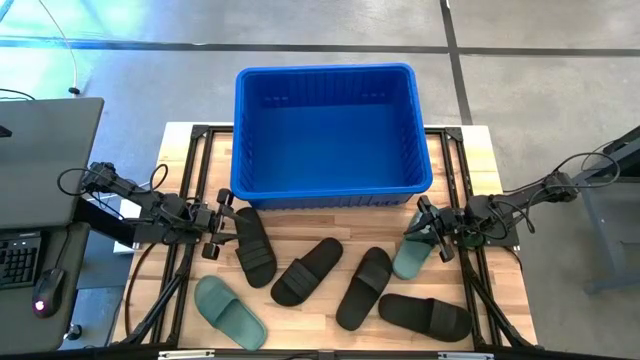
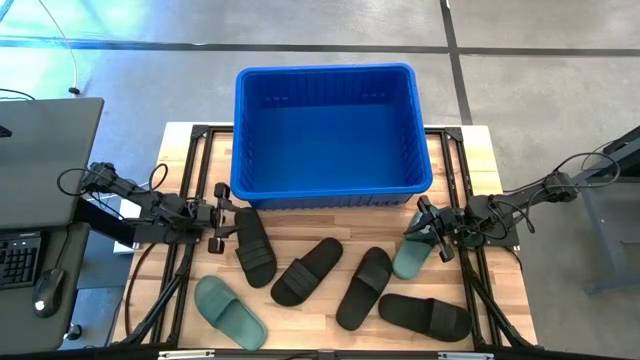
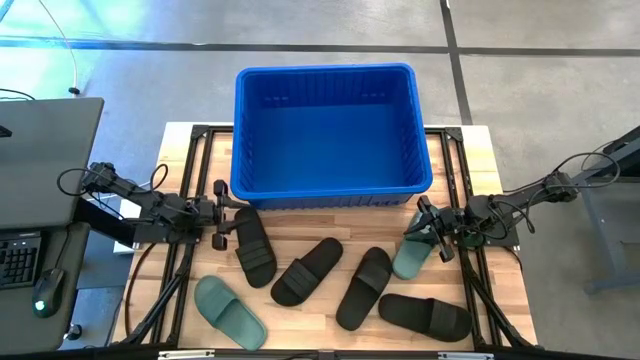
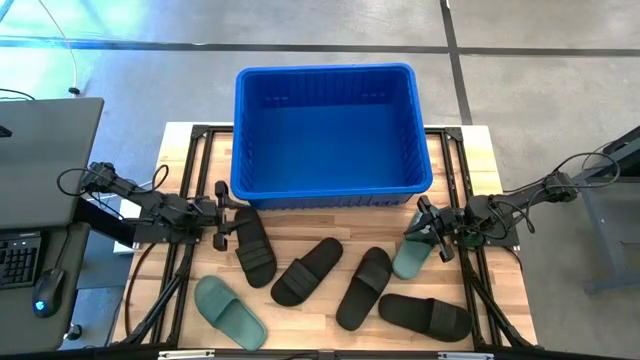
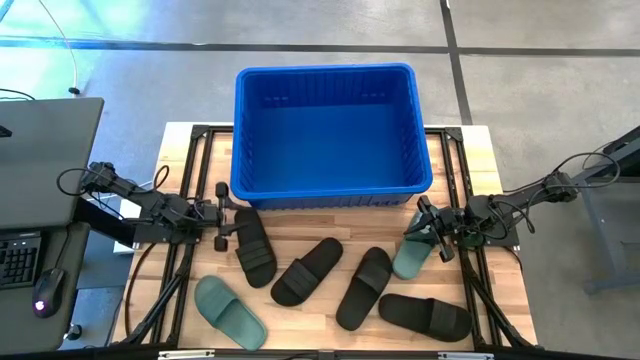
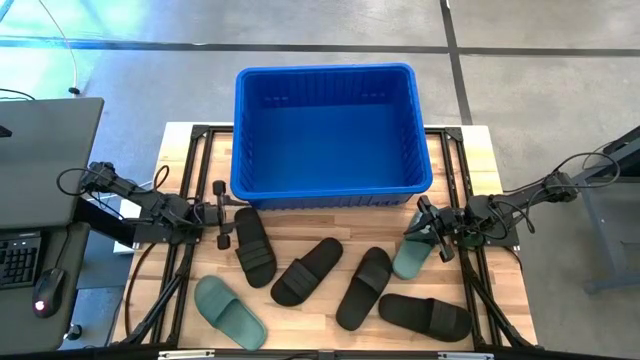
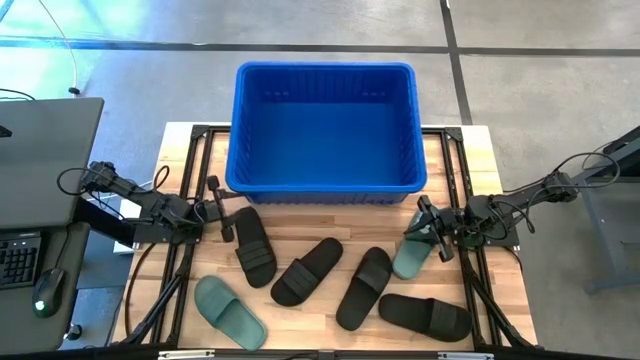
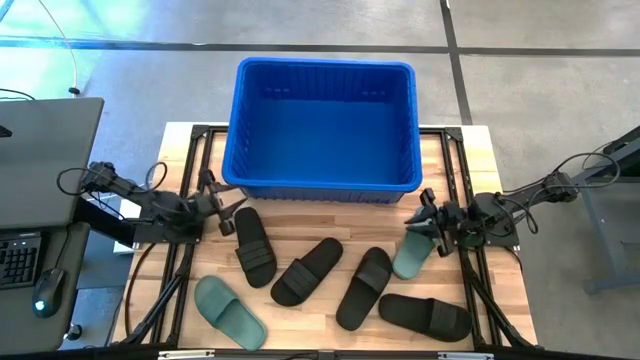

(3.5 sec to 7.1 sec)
Task: Pick and place slides into bin
Adjust the blue container

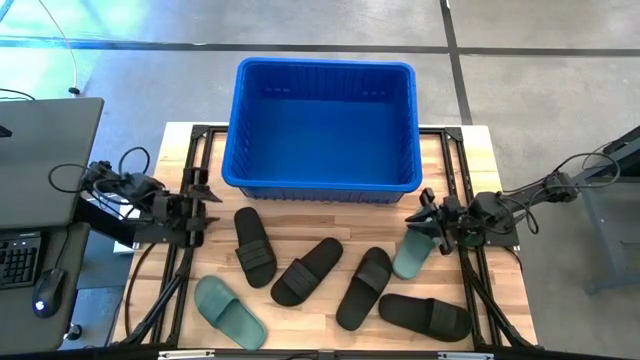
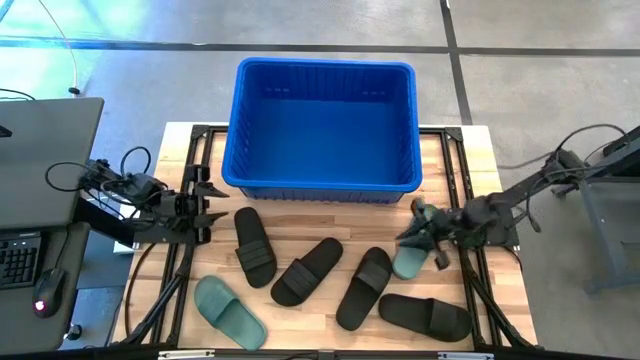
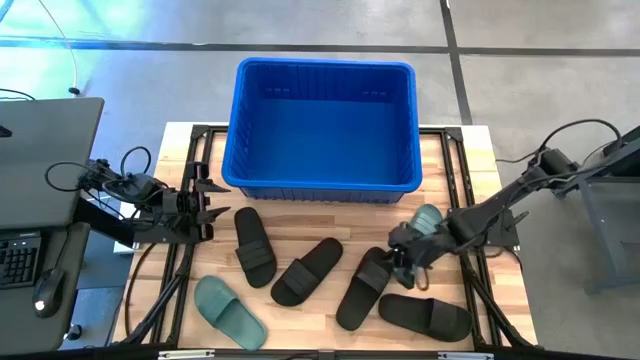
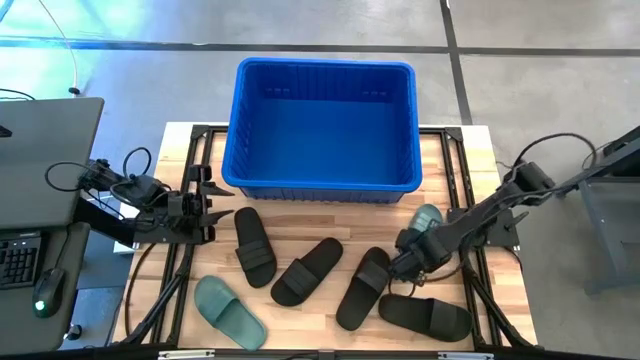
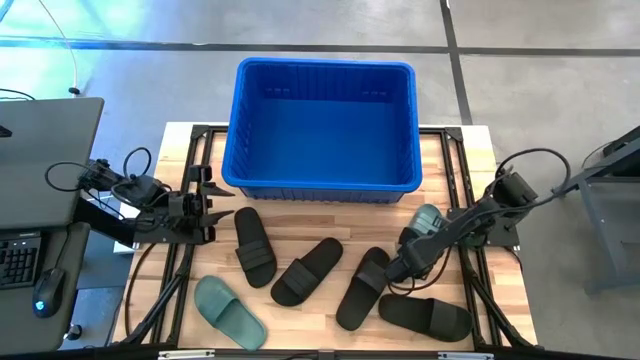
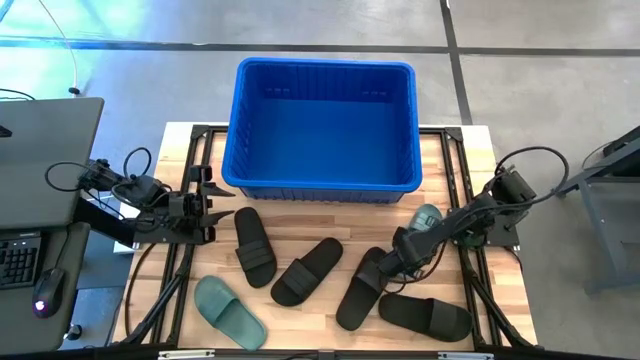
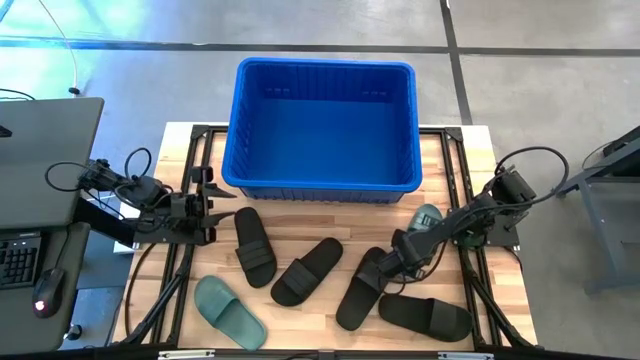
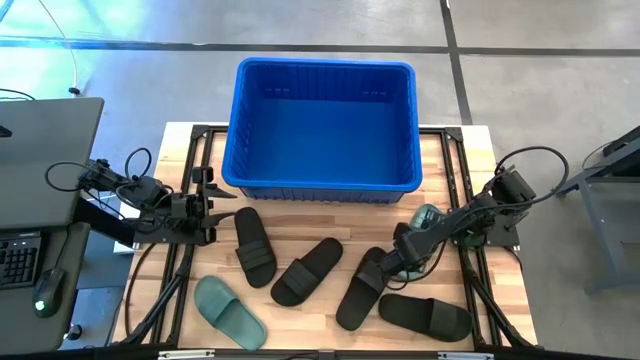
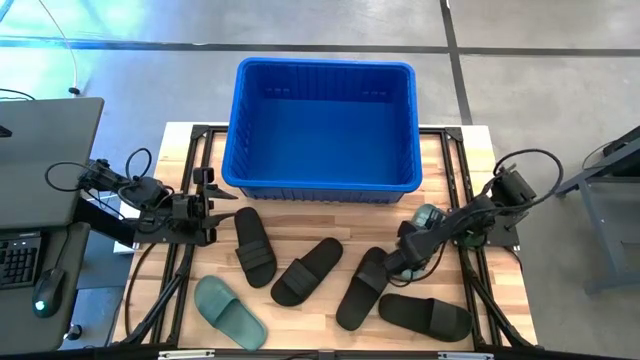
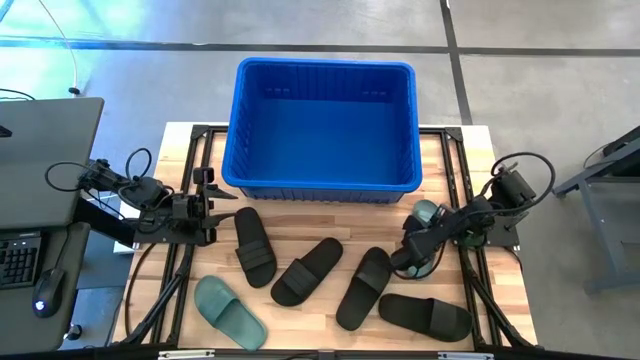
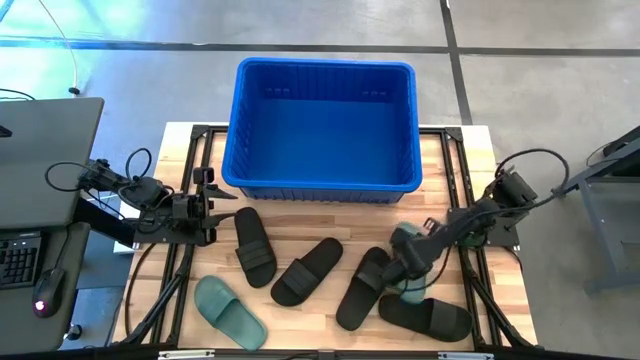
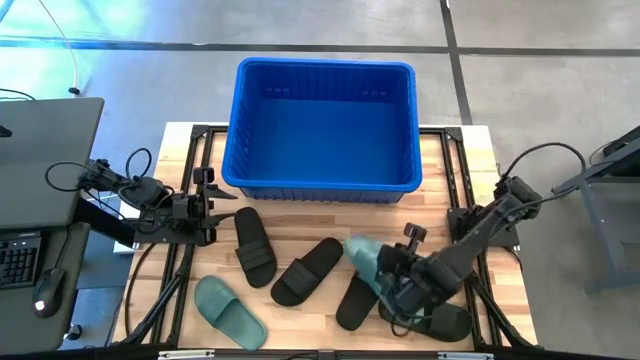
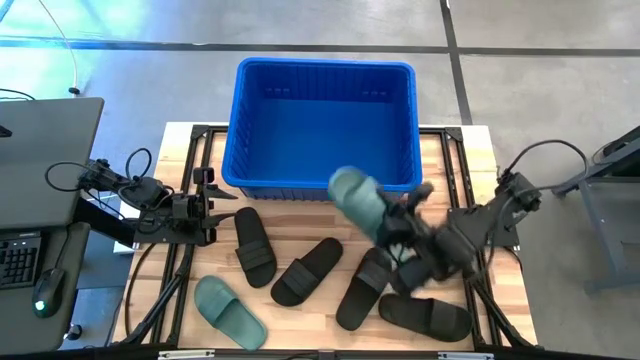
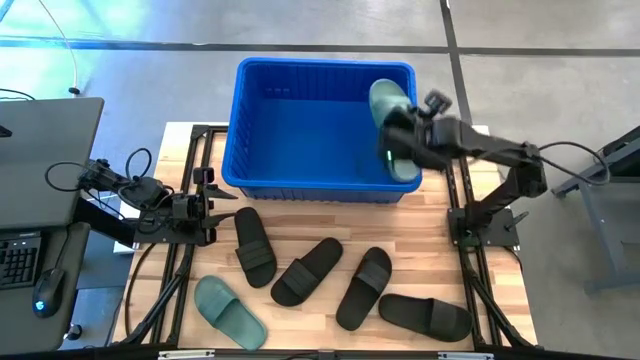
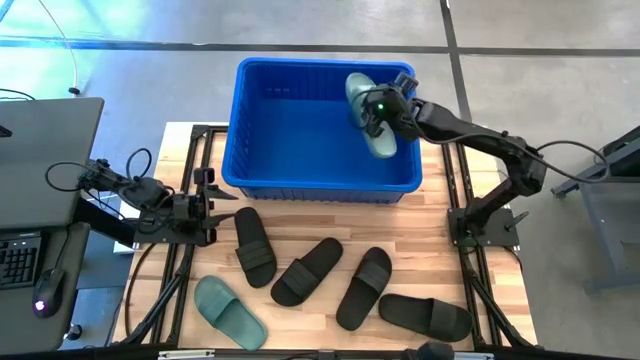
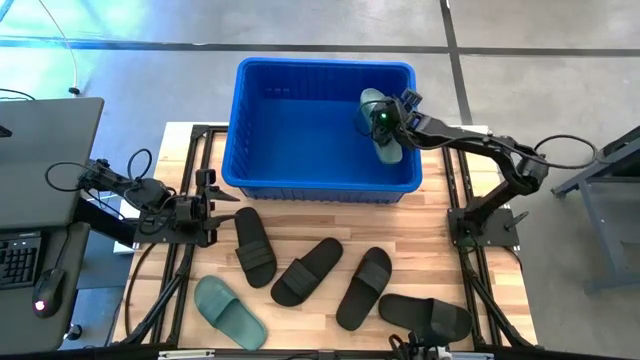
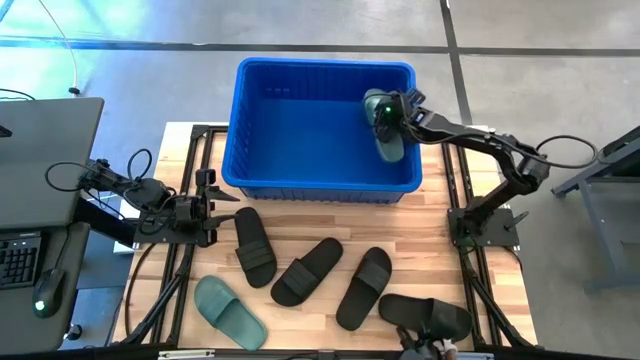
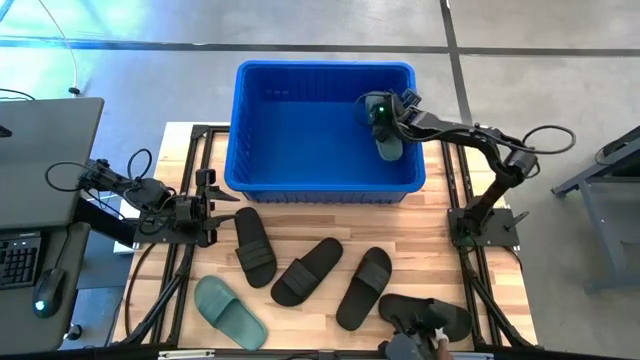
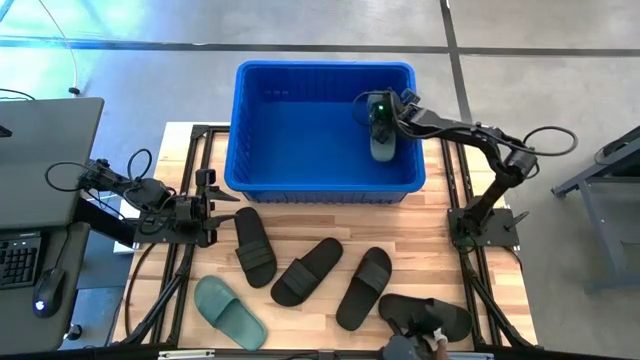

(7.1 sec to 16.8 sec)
Put the top green slide into the blue container

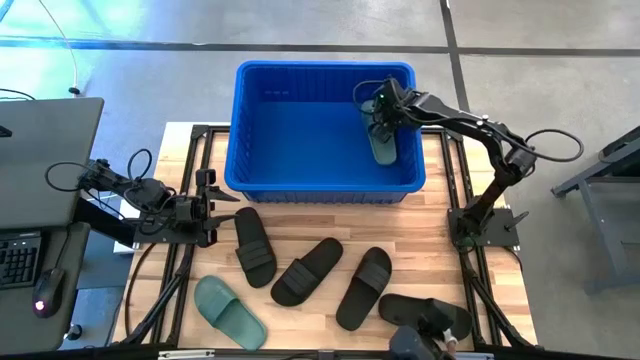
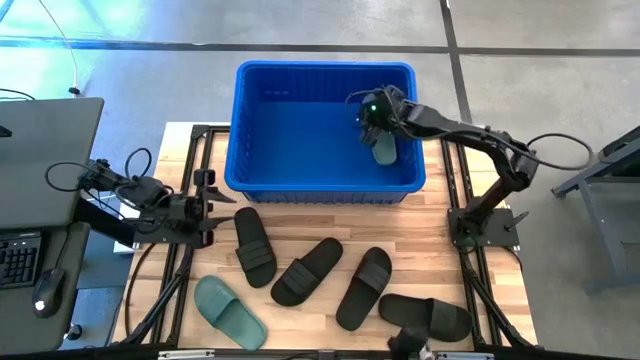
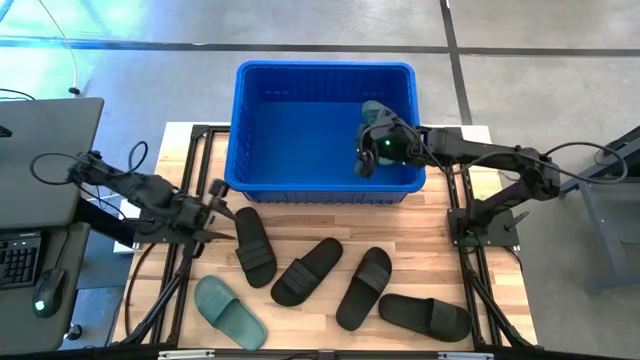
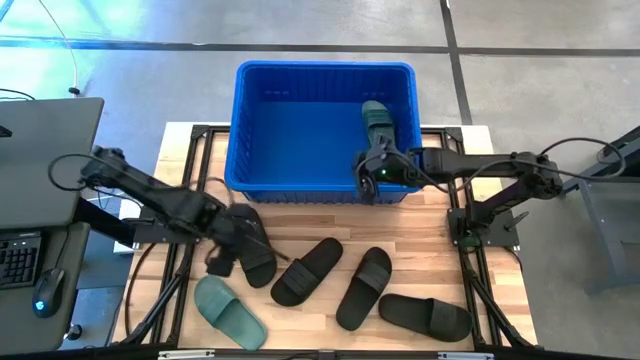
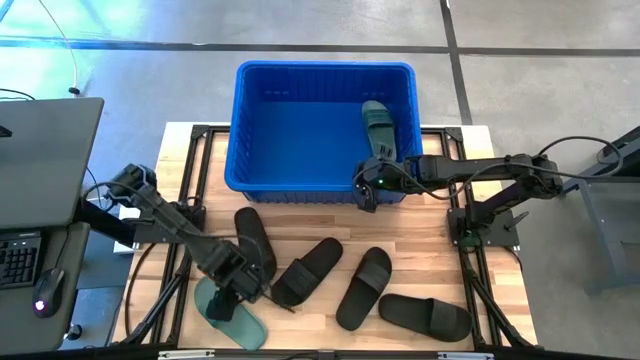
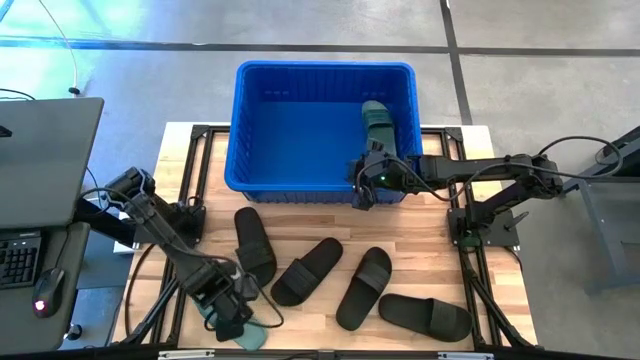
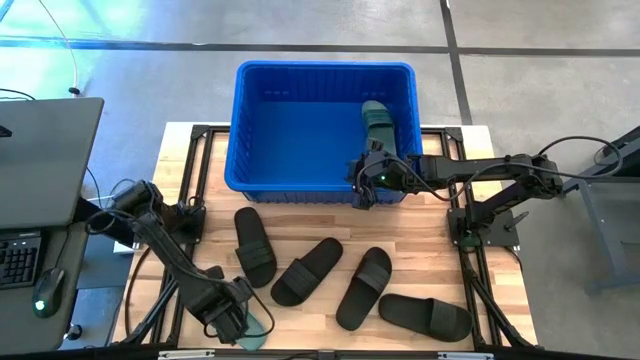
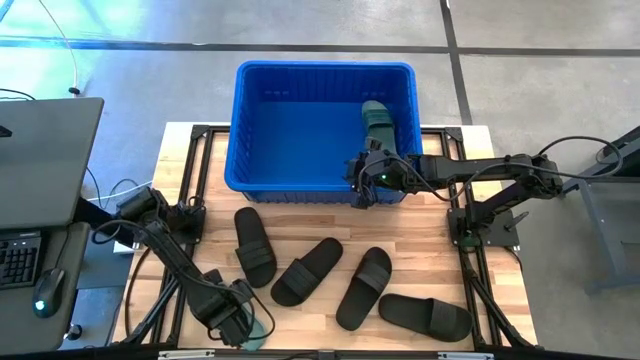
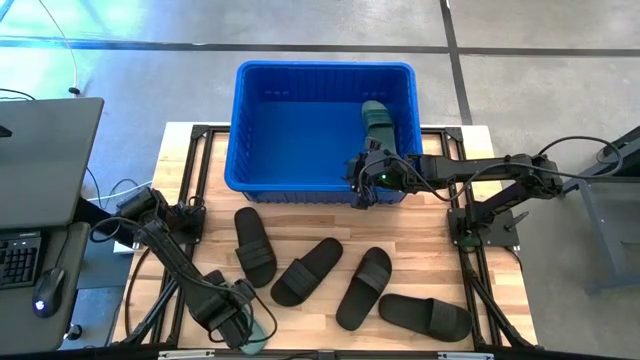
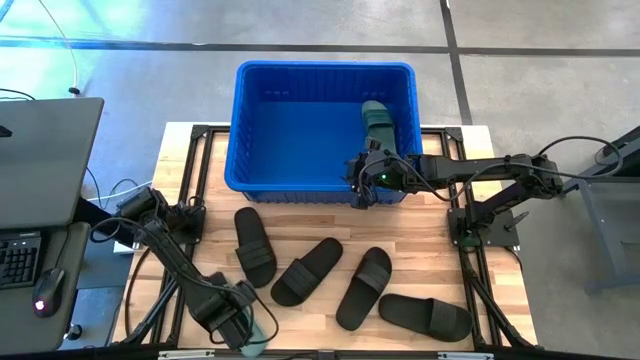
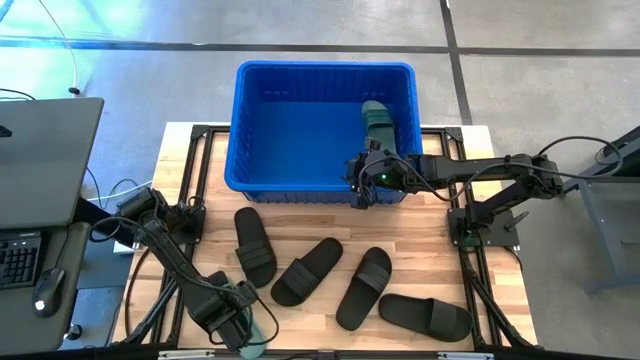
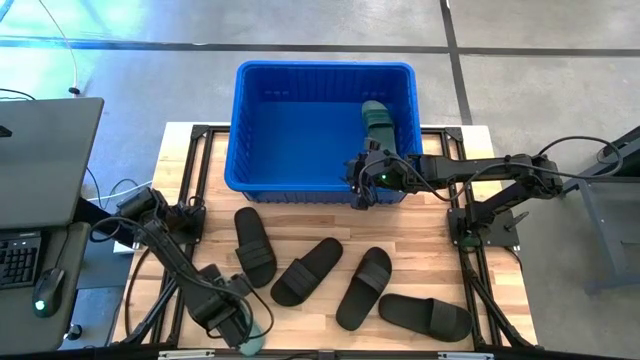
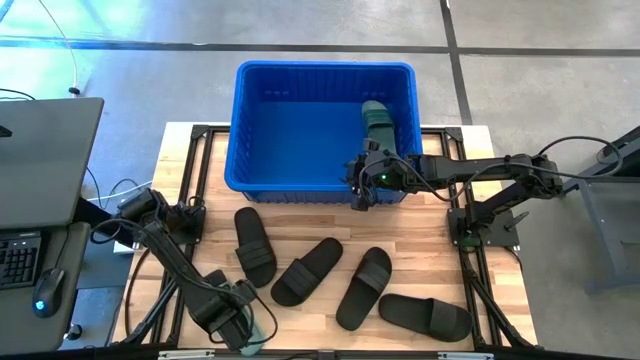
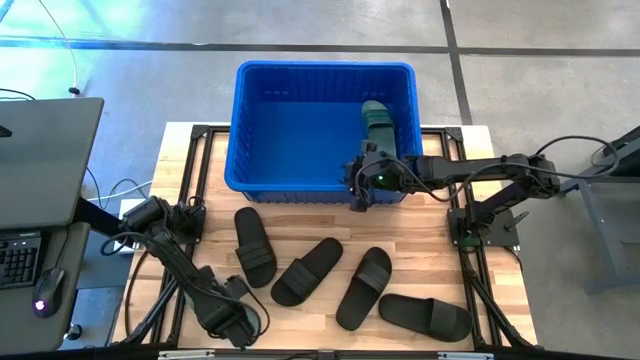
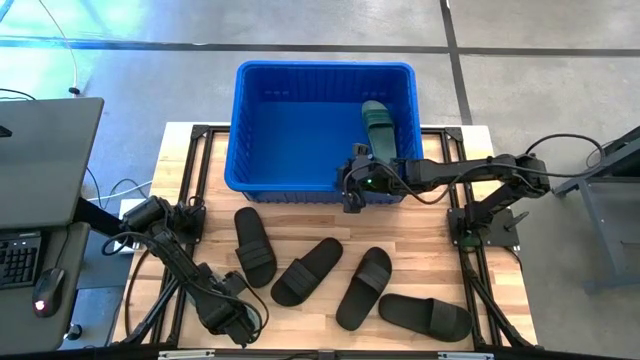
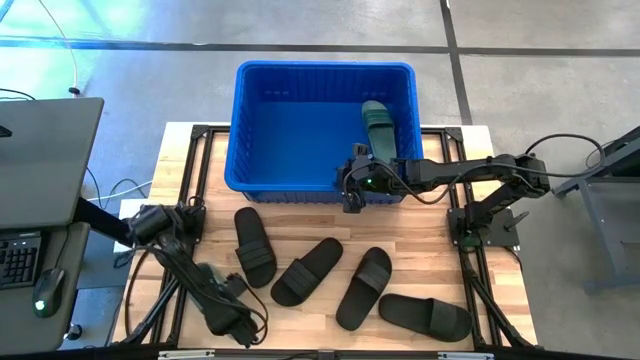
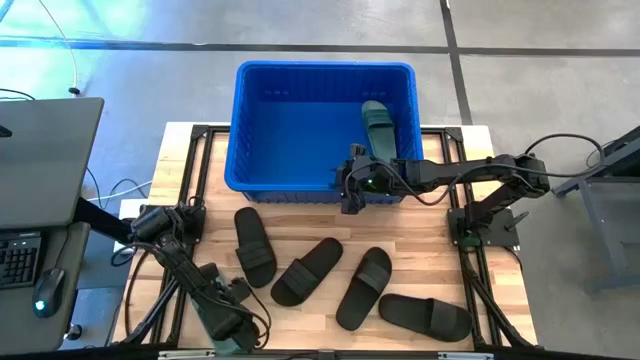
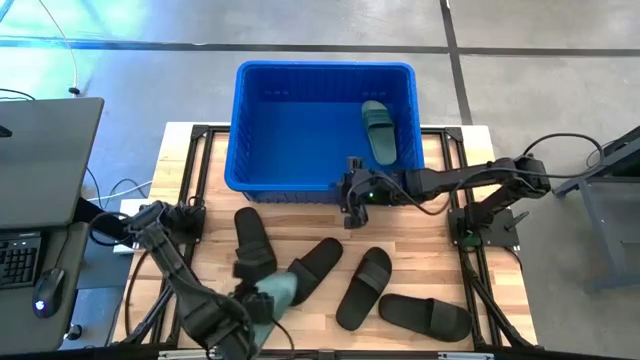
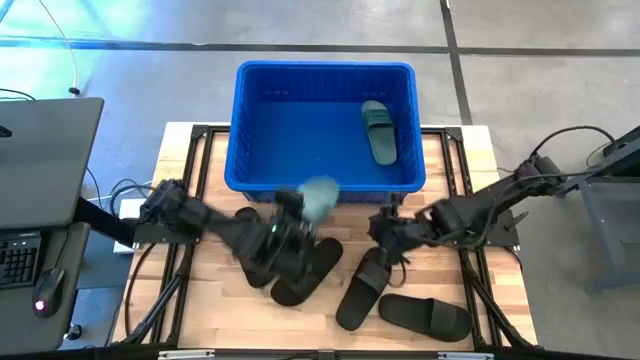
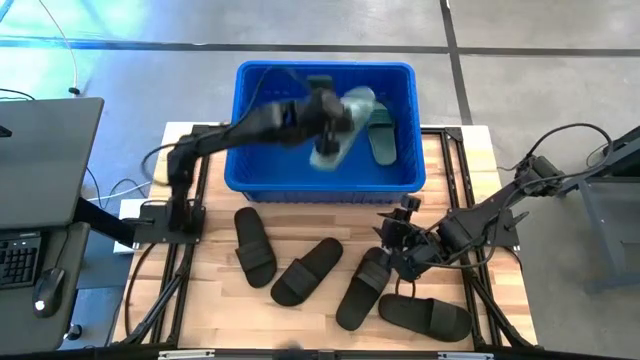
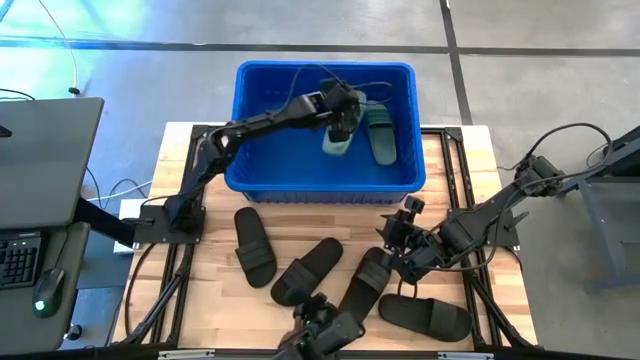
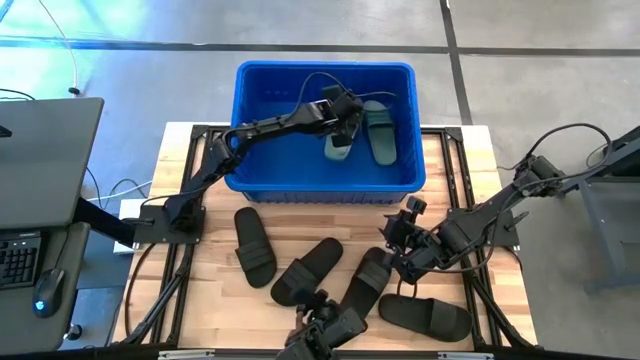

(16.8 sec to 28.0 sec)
Put the green slide into the blue container
